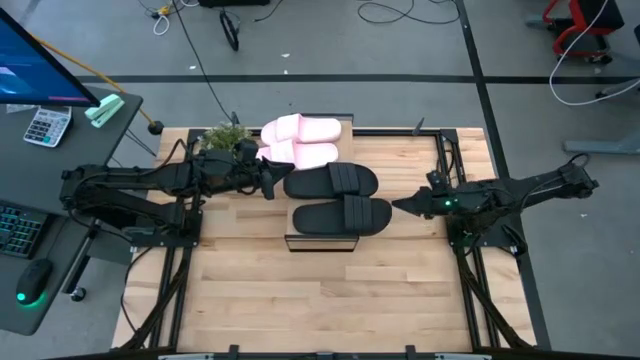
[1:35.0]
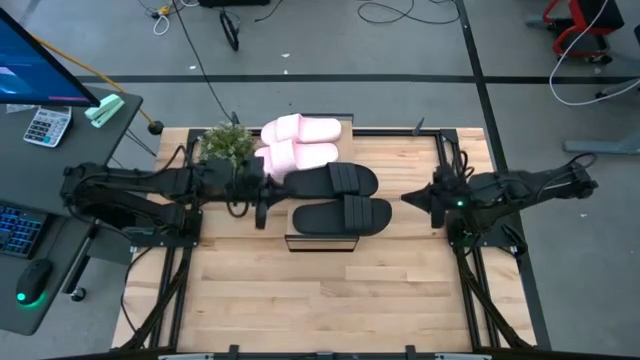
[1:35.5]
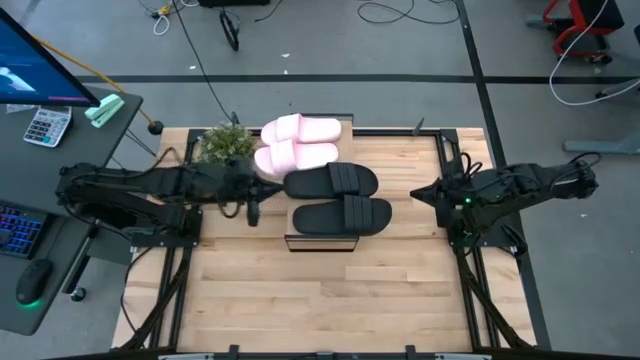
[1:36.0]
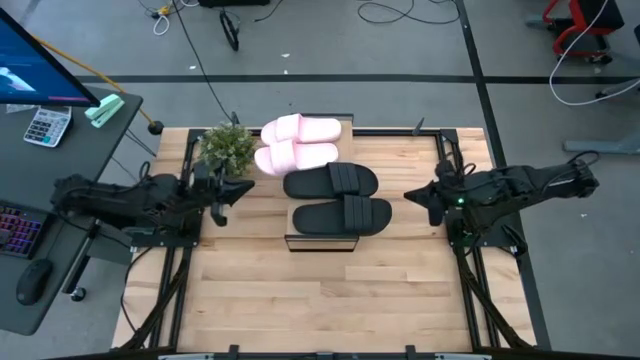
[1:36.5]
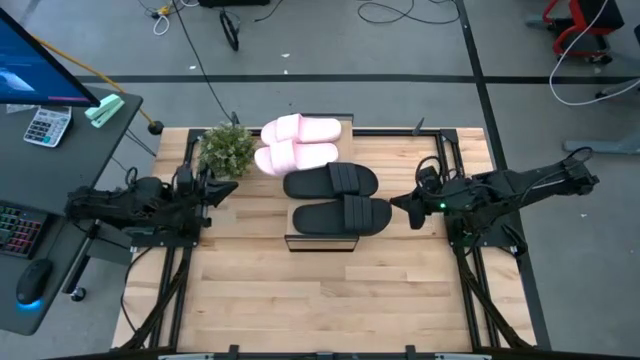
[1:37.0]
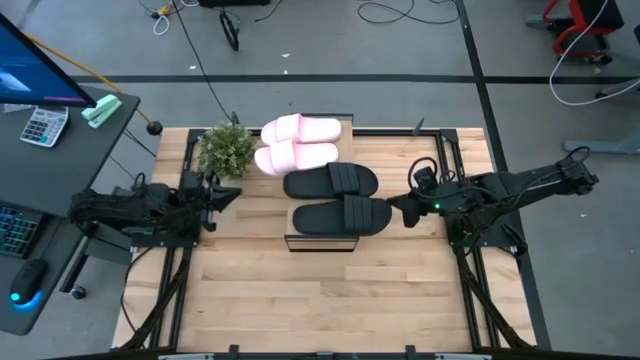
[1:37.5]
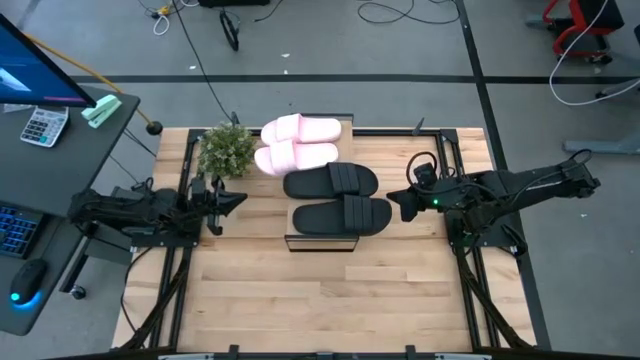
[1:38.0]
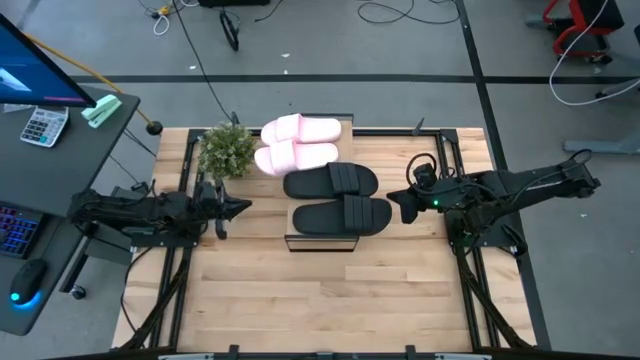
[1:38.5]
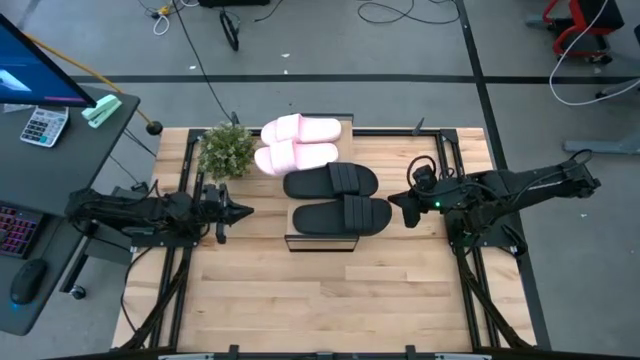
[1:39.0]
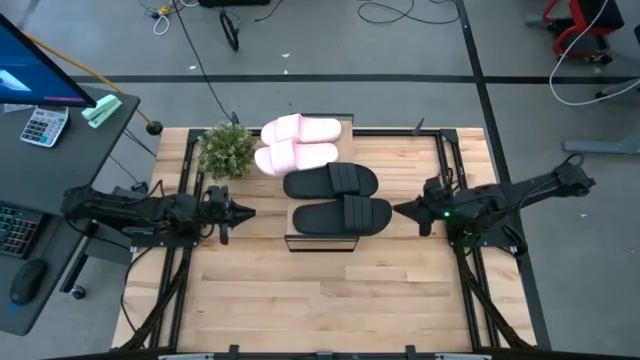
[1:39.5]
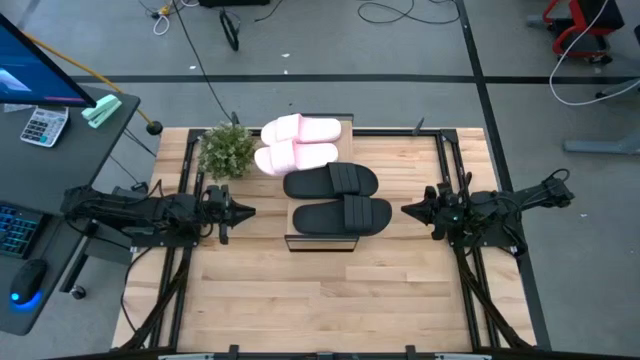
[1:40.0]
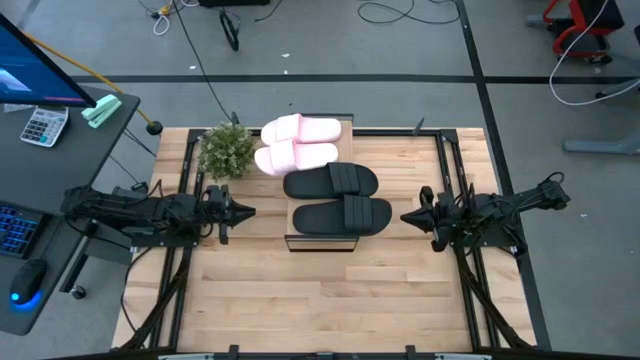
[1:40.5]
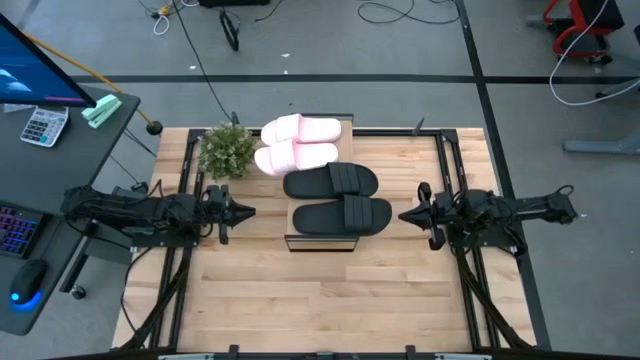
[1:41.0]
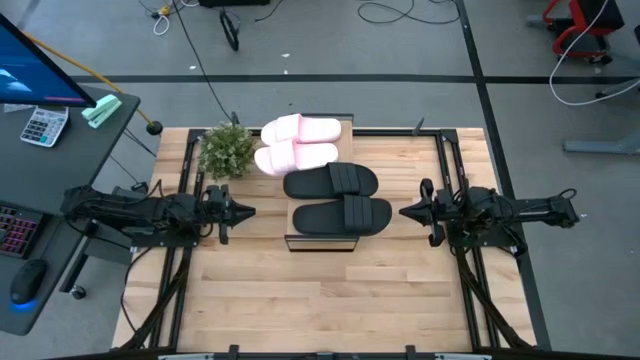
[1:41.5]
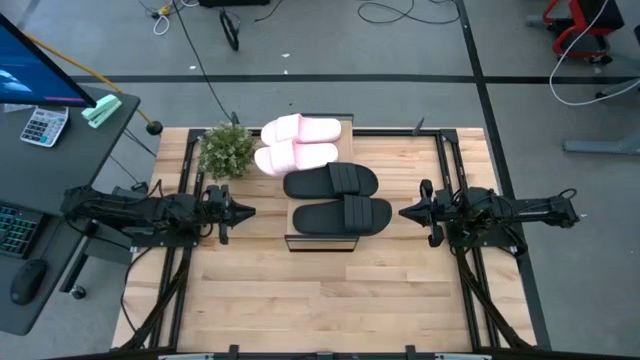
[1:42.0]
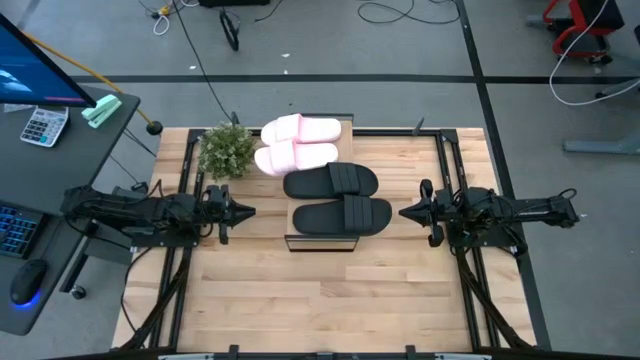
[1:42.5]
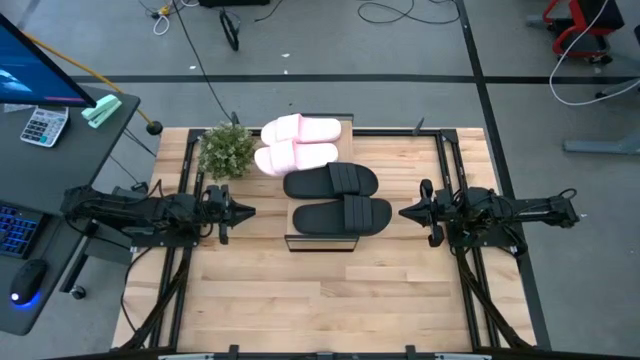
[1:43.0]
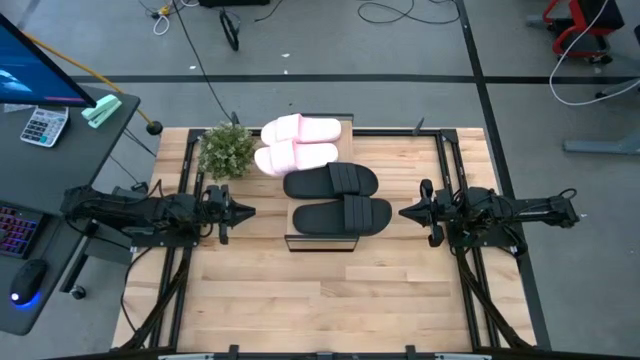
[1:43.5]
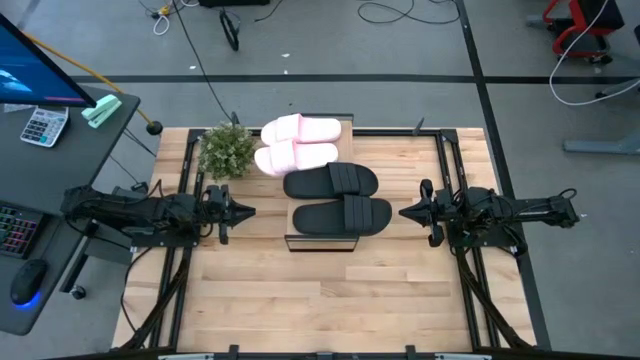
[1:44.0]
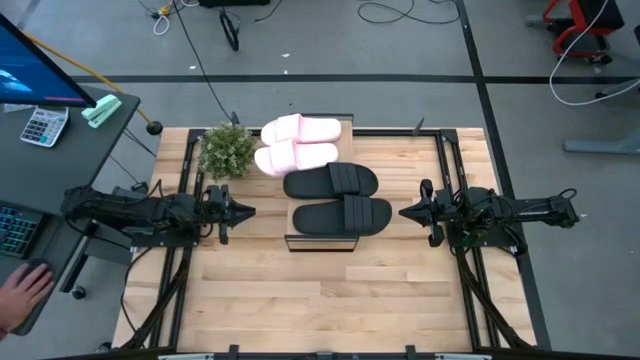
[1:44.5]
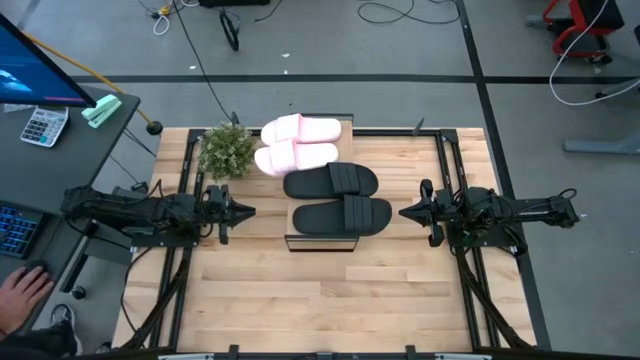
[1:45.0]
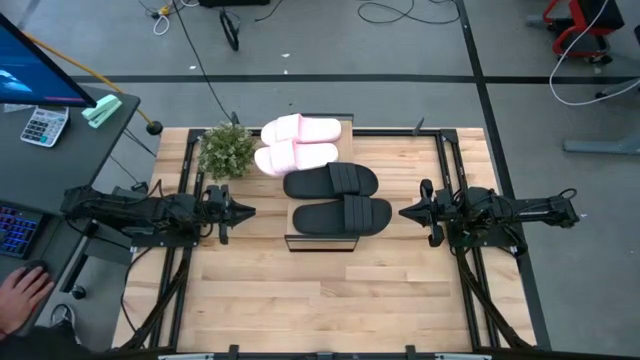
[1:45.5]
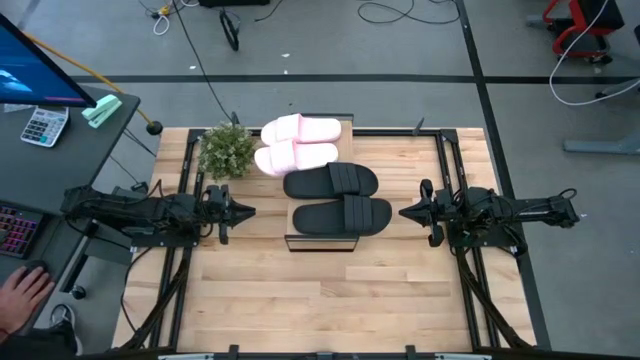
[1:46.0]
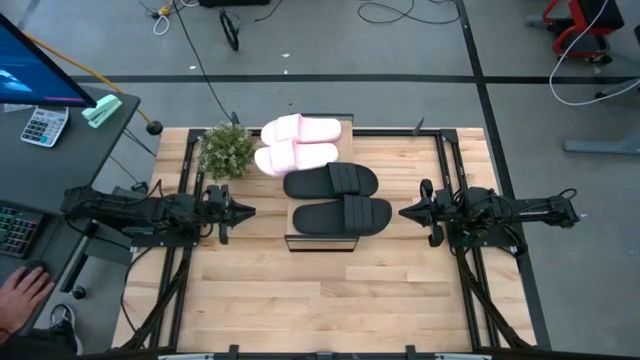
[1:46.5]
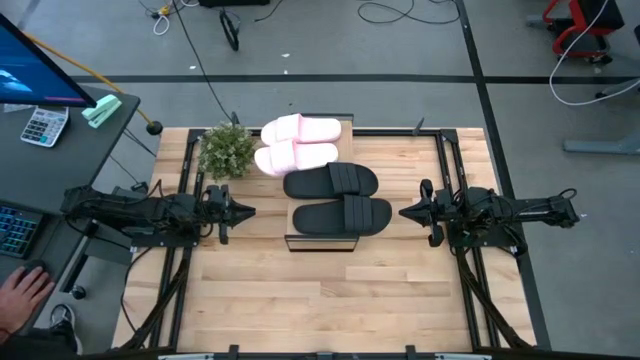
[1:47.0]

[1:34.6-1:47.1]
Task: Pick and place slides into the shelf
Return to Home Position

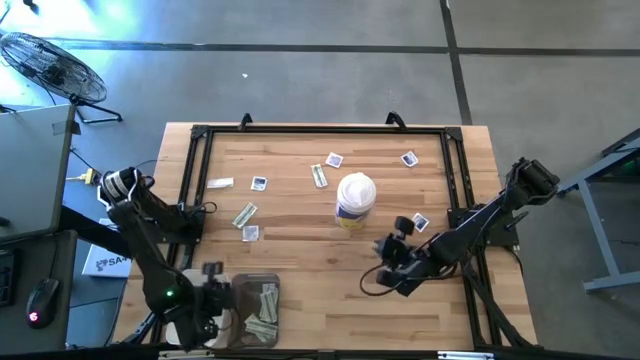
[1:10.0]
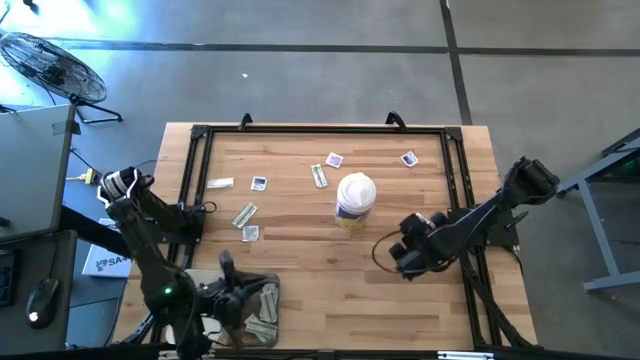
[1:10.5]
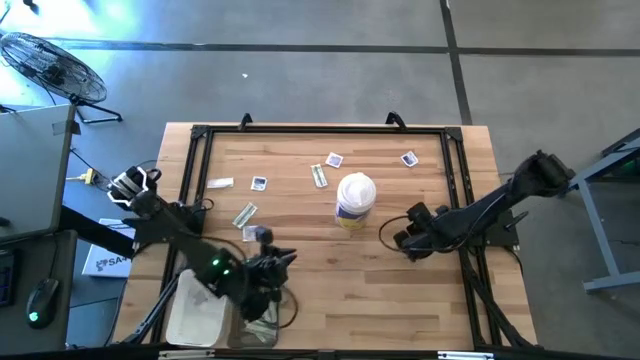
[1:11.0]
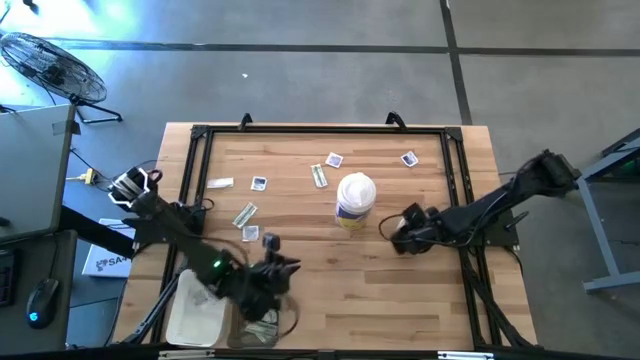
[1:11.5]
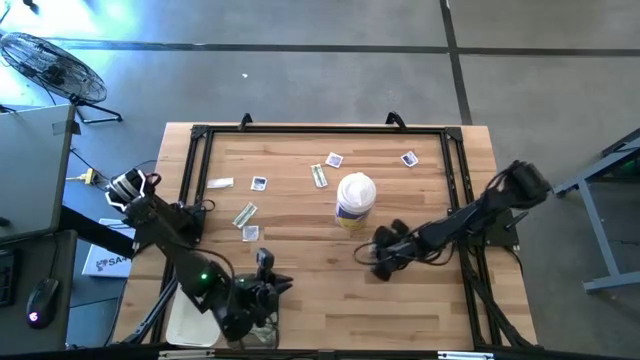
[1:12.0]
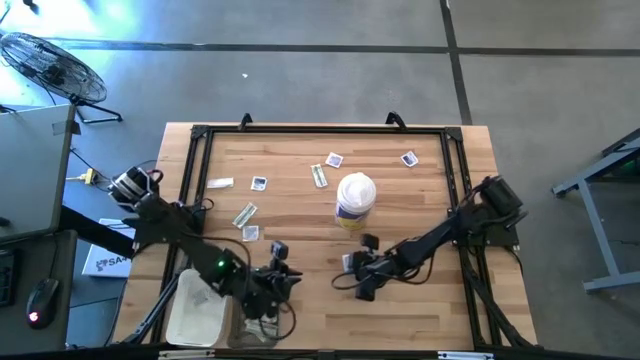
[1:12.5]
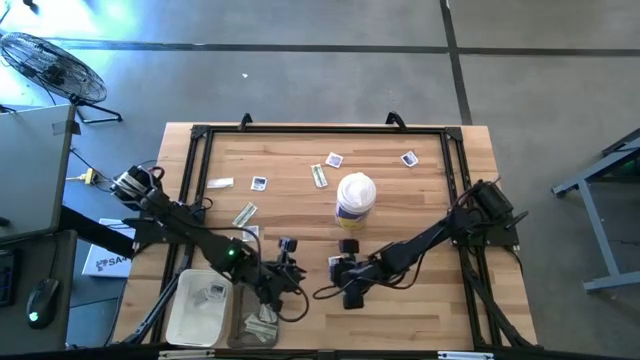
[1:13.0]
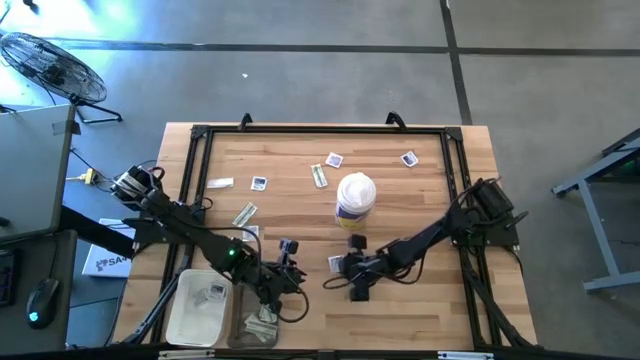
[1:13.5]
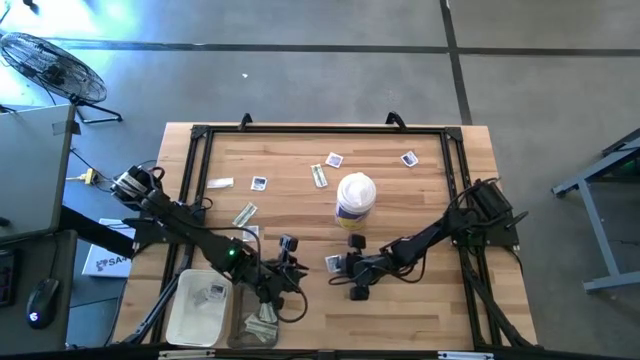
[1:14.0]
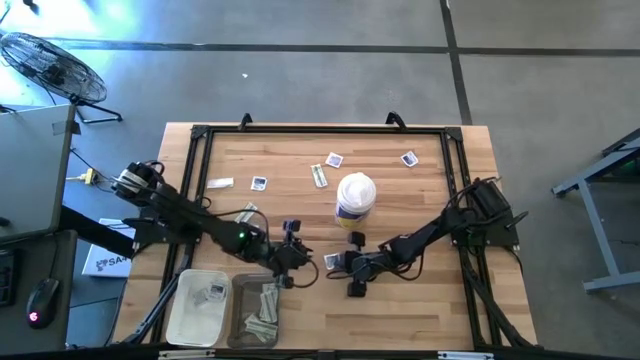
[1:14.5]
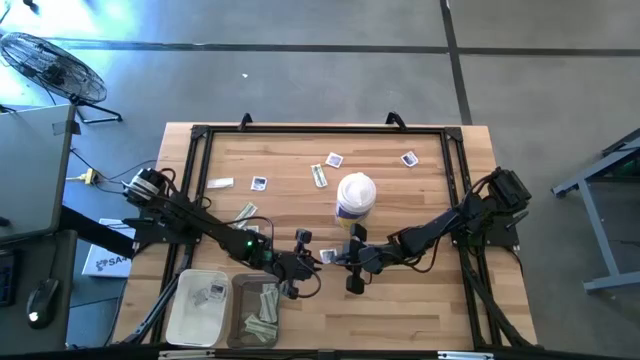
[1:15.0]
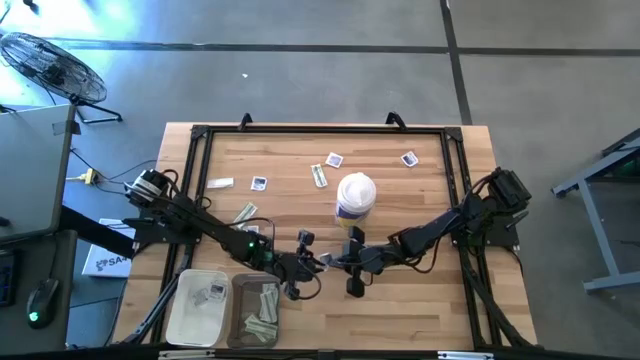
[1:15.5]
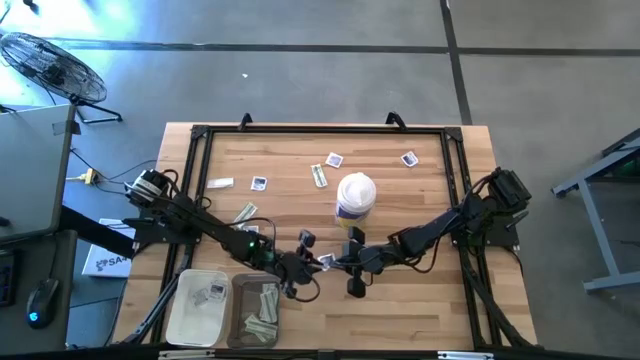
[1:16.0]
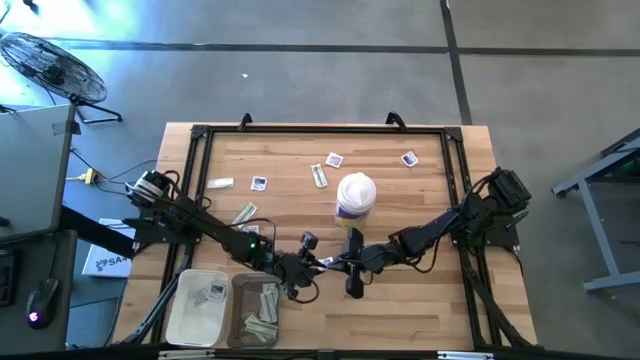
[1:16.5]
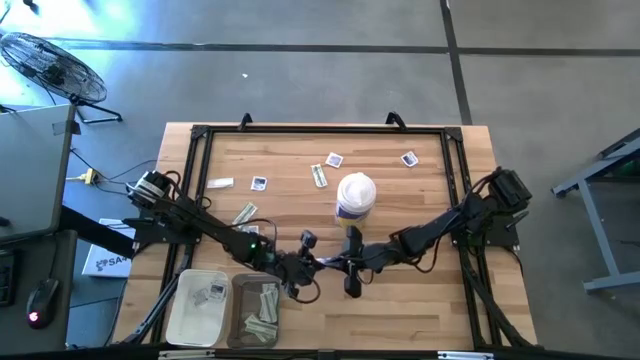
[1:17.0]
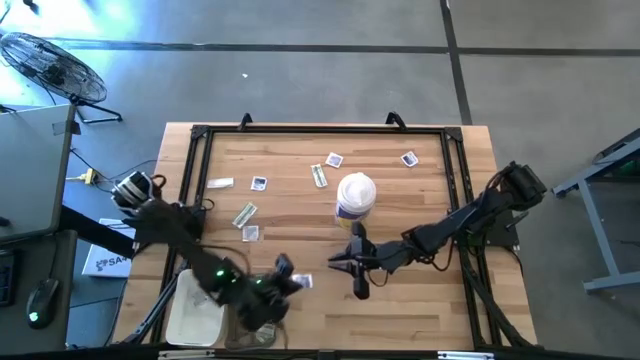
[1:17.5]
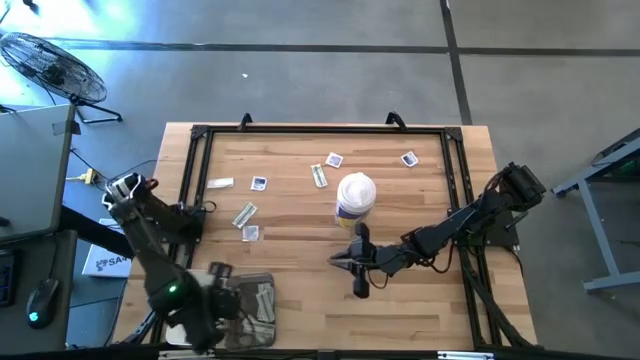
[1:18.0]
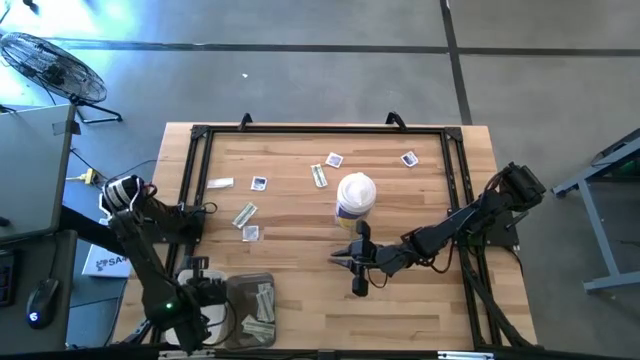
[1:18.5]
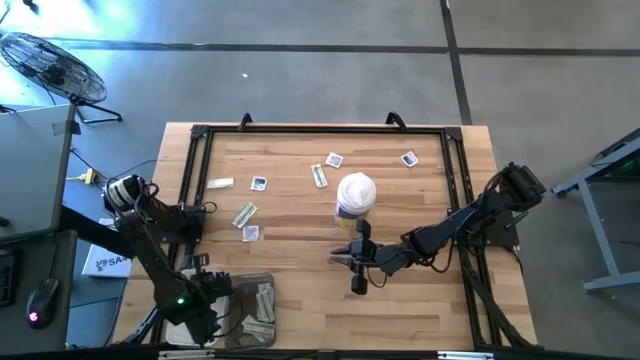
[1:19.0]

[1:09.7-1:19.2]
Task: Pick & Place First Aid Supplies
Put the alcohol pad into the white bin
